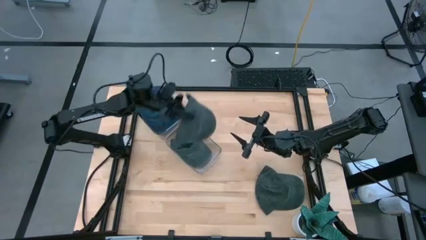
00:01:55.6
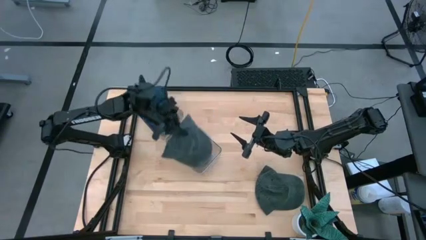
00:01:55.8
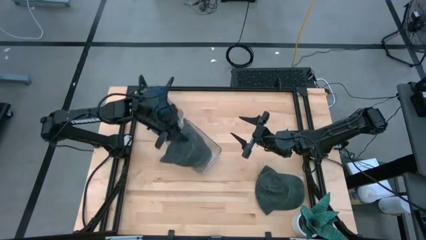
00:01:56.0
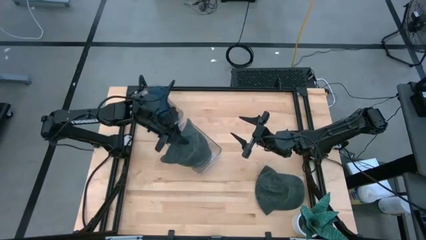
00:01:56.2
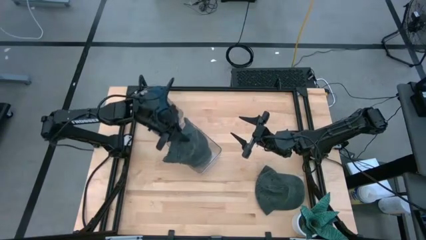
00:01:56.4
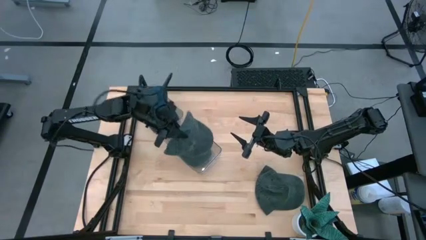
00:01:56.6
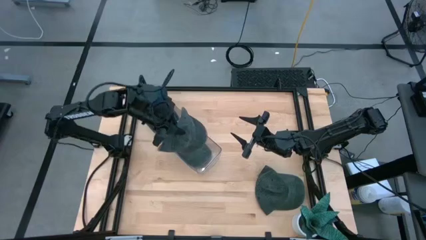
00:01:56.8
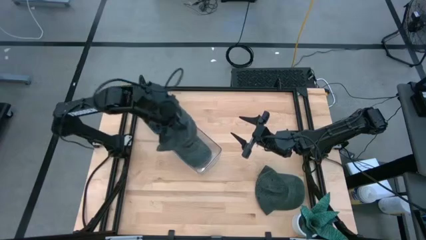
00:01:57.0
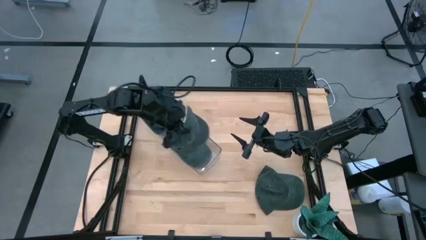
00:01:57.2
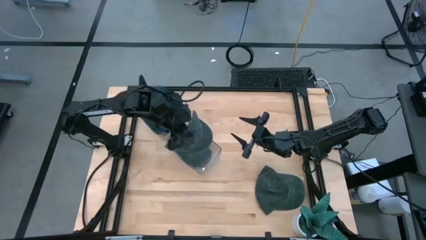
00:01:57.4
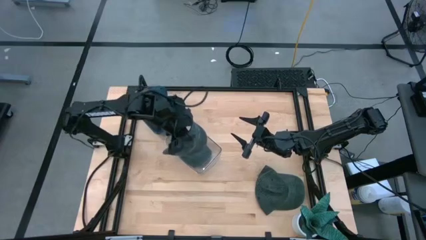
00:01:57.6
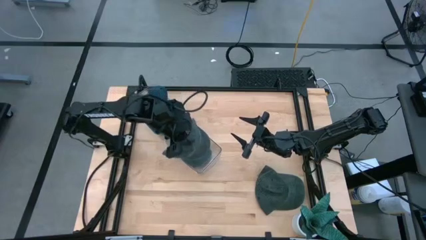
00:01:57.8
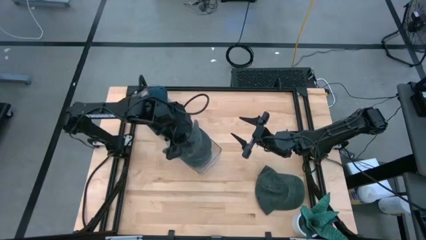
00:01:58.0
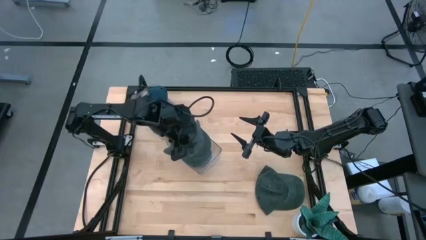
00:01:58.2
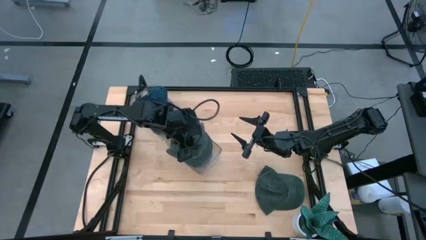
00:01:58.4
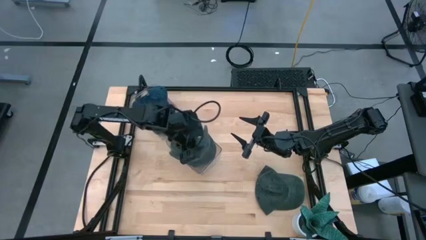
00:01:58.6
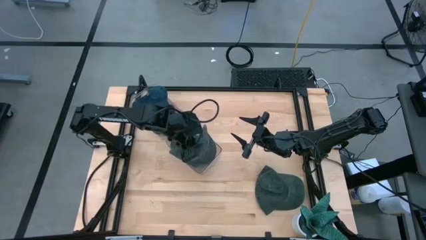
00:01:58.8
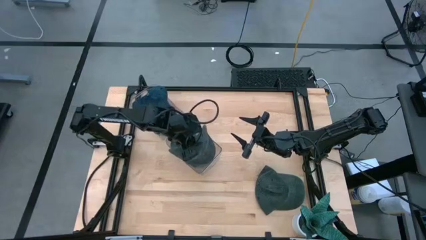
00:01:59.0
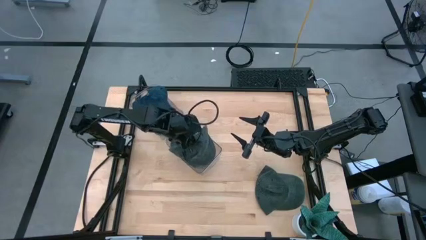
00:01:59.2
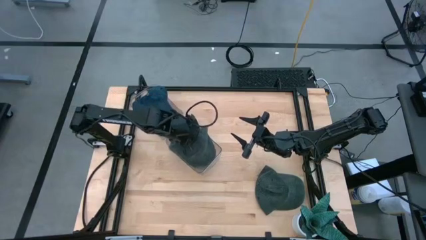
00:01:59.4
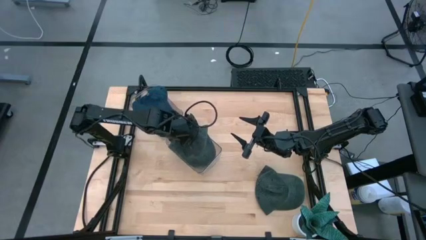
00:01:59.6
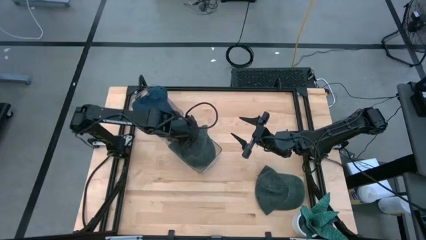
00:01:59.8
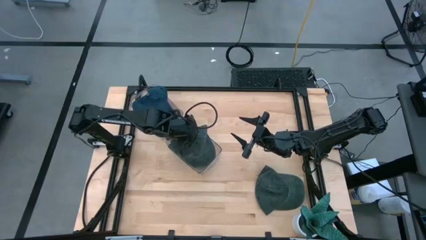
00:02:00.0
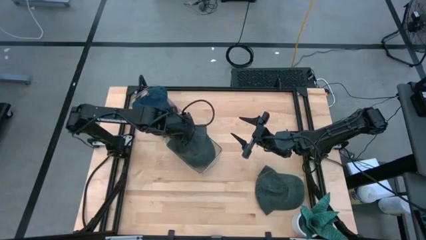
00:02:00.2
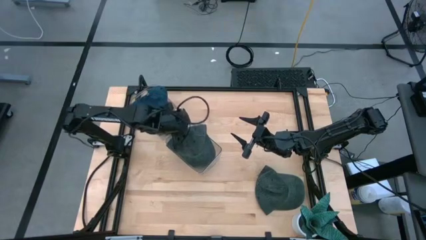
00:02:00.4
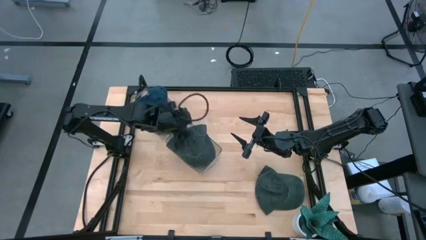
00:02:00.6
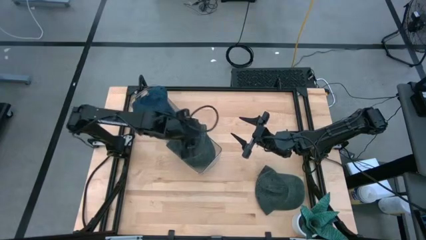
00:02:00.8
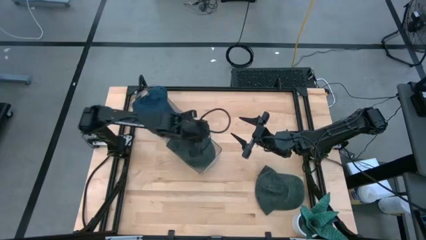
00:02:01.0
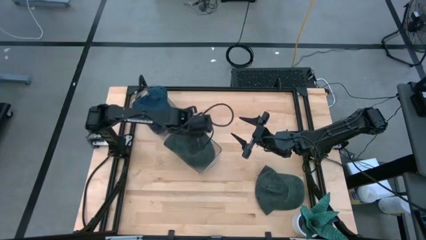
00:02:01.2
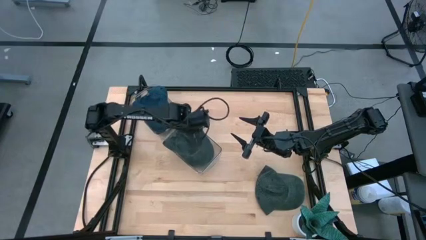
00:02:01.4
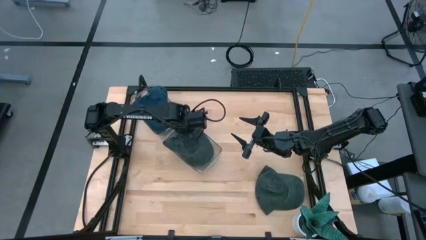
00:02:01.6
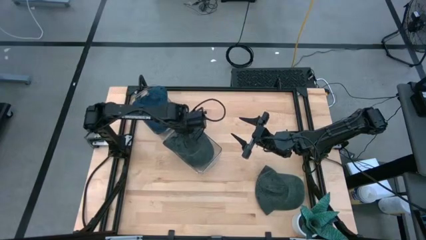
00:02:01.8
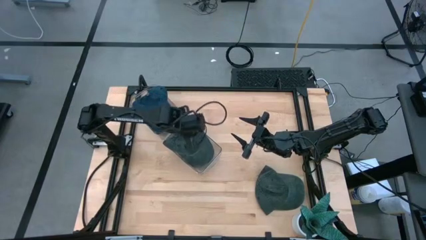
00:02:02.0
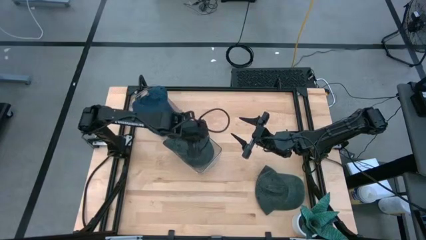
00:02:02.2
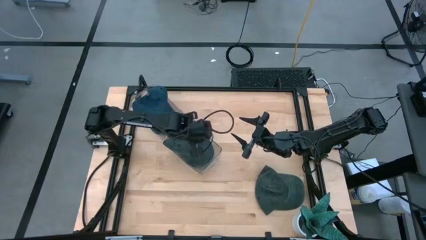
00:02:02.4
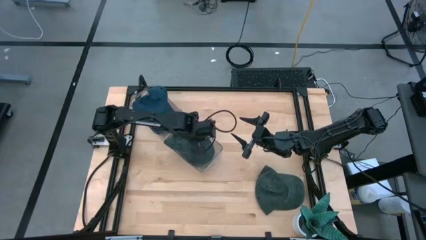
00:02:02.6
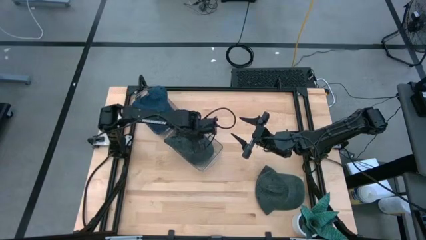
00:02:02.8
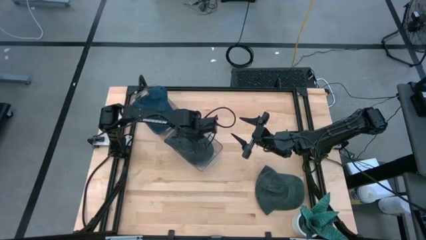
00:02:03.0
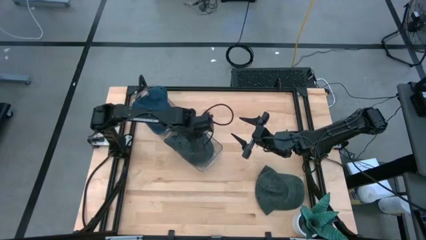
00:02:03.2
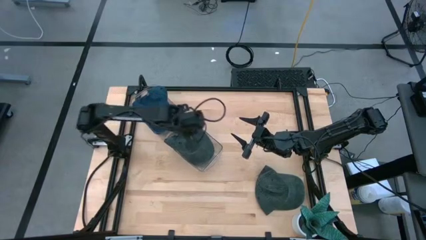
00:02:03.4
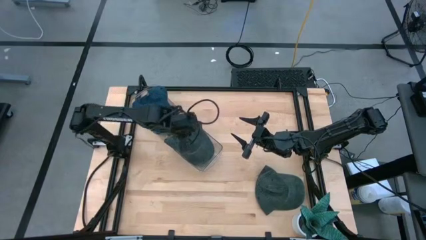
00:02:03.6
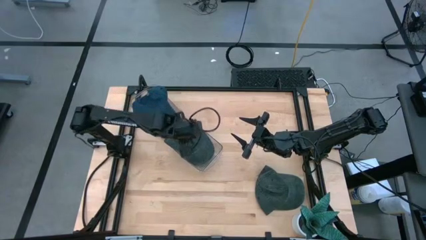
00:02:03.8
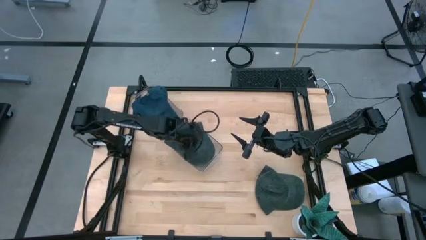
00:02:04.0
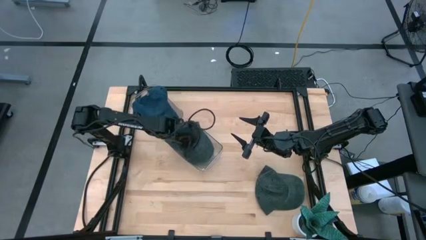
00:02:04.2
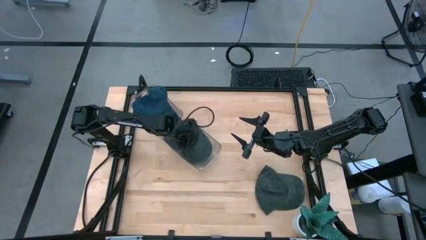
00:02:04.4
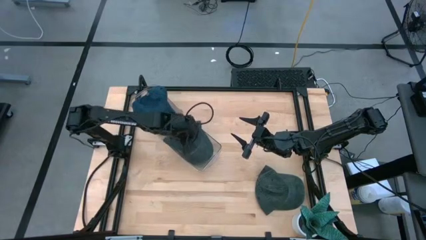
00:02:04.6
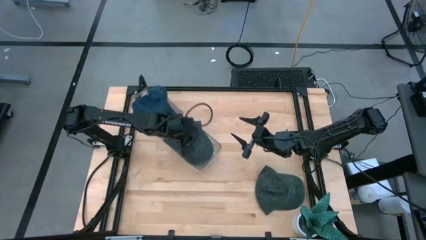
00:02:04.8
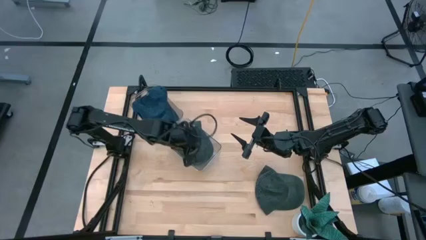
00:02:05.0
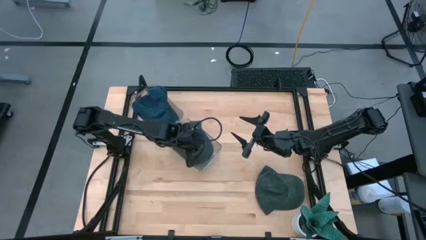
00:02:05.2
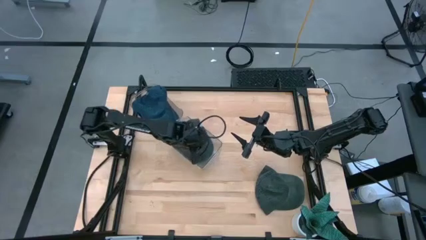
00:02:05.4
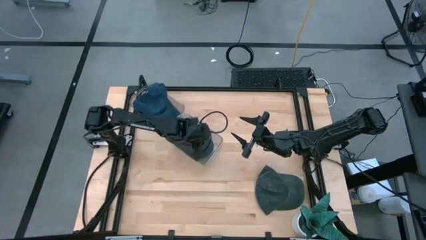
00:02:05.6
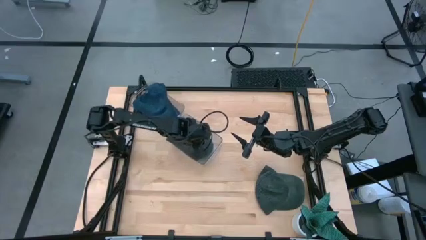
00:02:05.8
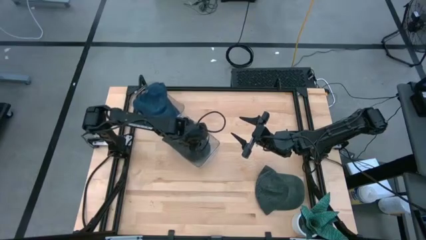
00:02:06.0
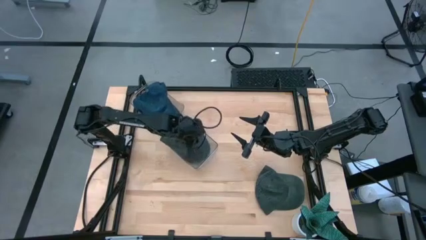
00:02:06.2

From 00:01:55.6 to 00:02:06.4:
Task: Pick & Place hat
Put the top black cap into the bottom transparent bin

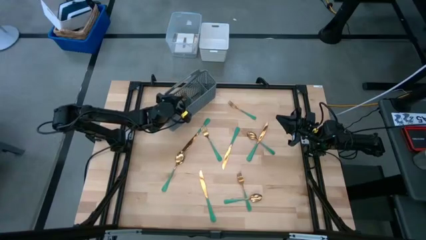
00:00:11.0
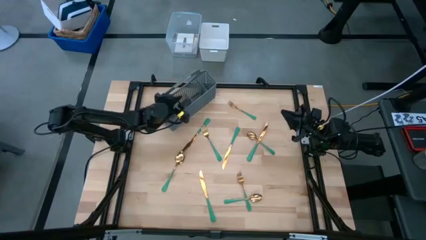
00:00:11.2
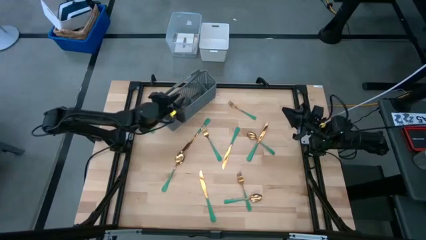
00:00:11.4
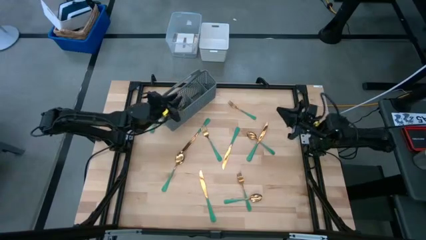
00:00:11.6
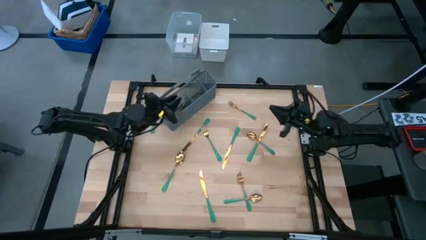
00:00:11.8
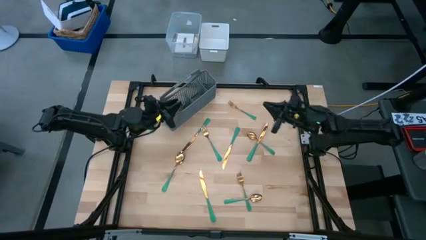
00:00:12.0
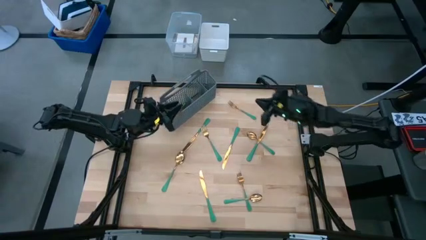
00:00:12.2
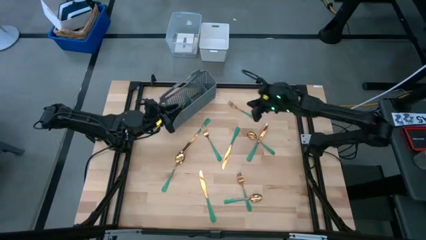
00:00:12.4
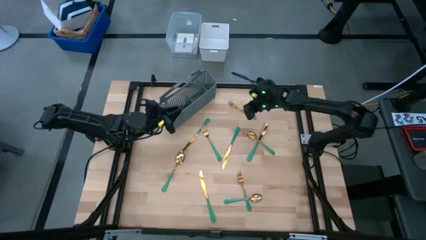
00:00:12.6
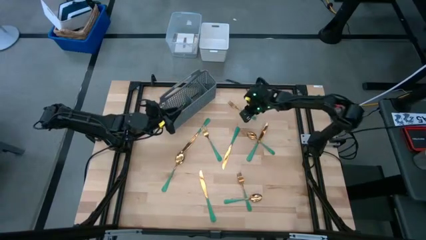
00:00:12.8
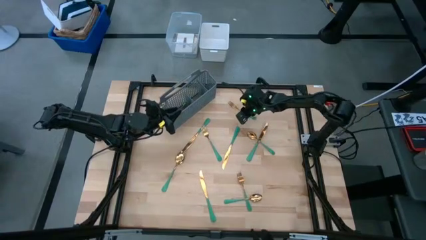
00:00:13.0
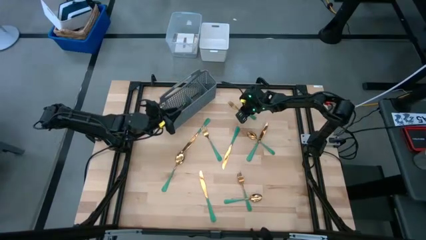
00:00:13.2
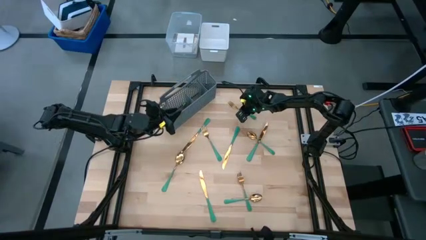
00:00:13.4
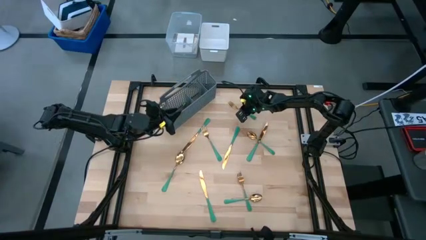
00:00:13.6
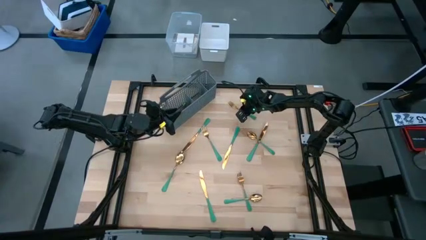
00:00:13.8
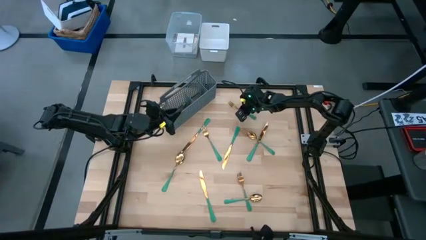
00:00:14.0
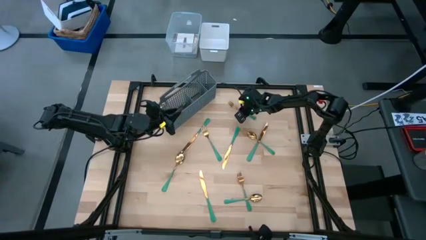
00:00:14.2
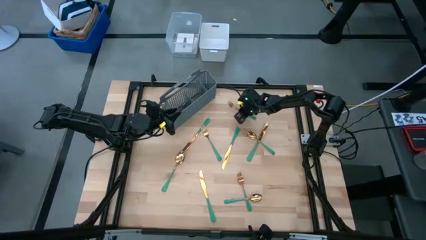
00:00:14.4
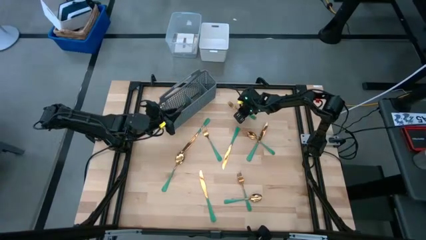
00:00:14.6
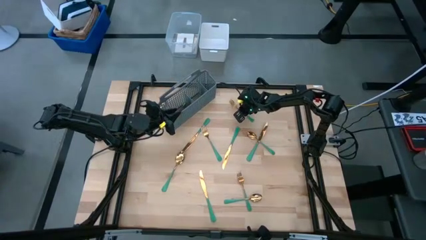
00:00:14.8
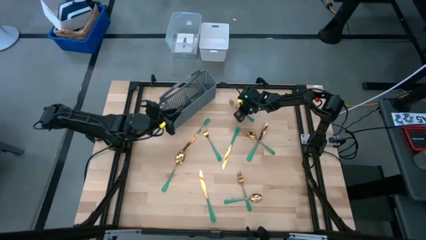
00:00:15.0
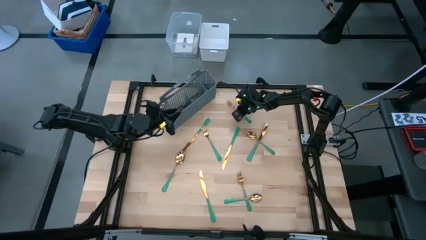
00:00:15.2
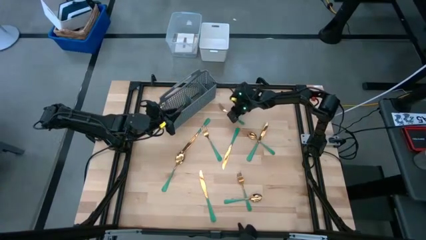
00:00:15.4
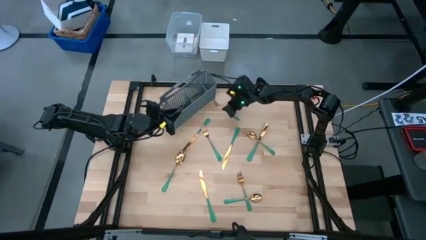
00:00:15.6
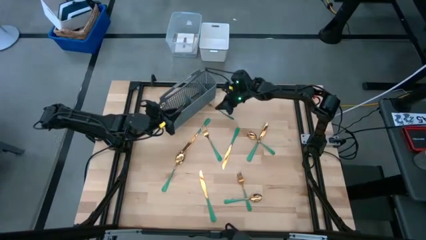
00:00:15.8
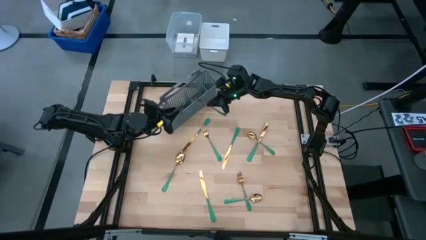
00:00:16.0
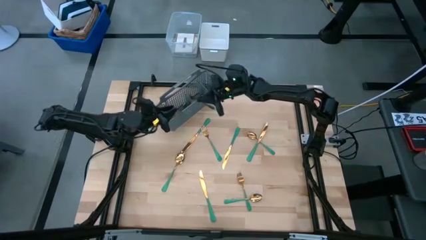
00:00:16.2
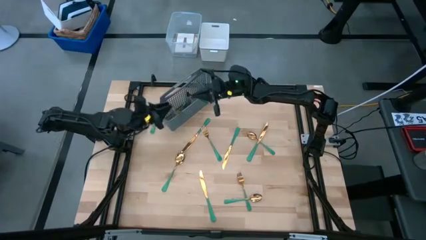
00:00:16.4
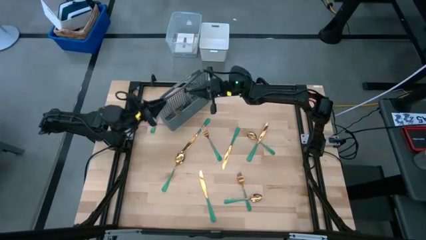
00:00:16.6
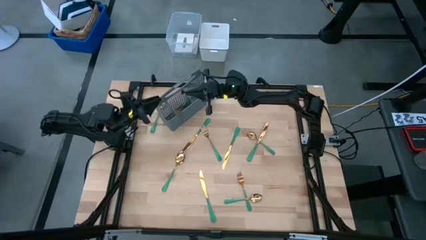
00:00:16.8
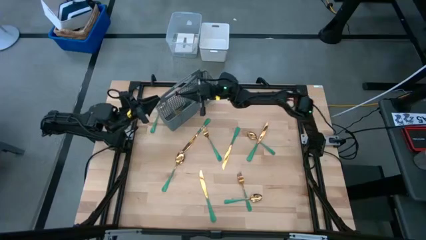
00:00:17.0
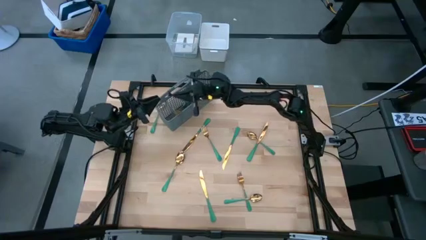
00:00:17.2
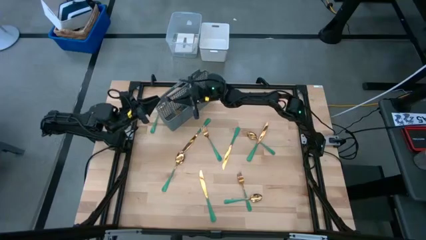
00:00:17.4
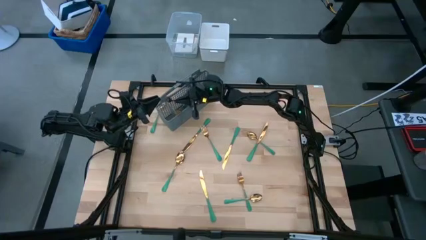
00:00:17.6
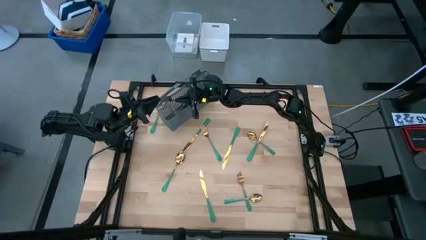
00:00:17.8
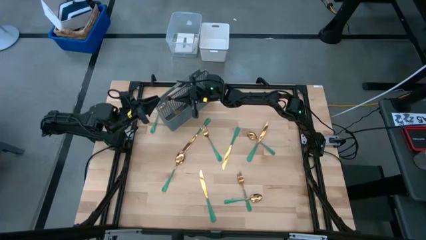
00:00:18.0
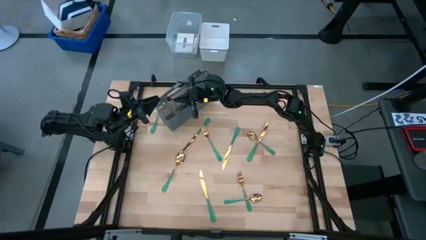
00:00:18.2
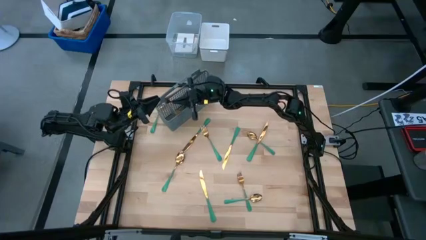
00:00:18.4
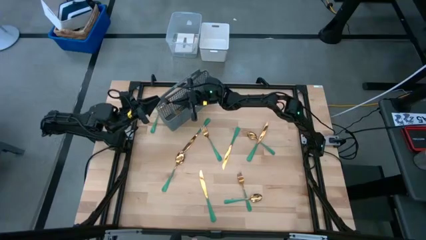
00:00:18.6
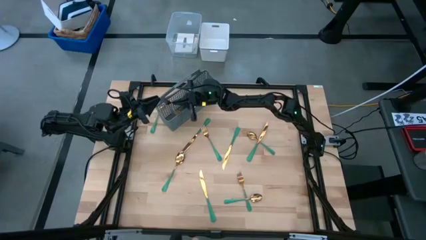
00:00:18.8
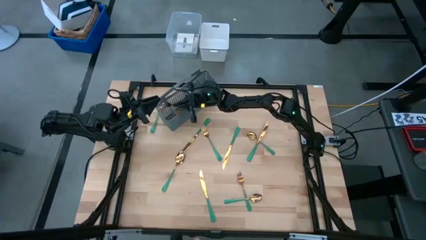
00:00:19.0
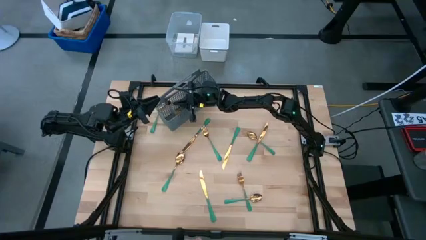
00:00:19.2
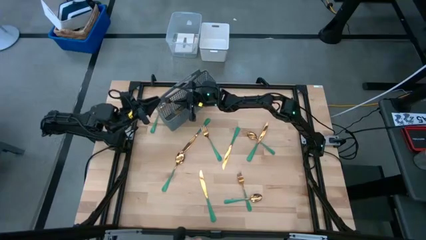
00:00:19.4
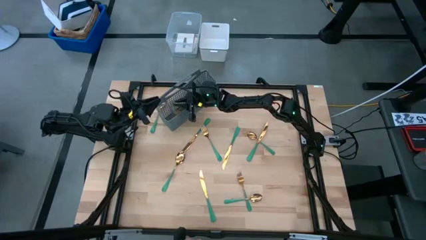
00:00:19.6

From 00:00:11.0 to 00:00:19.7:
Task: Sort silverware
Put the top green-gold fork into the silverware basket
